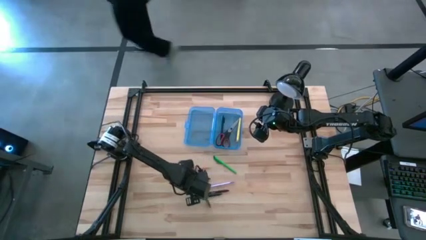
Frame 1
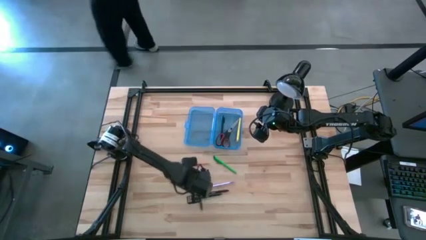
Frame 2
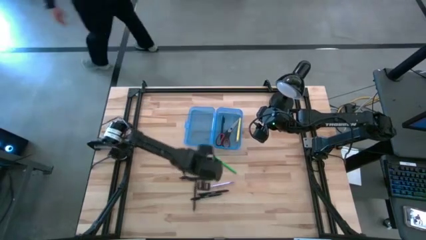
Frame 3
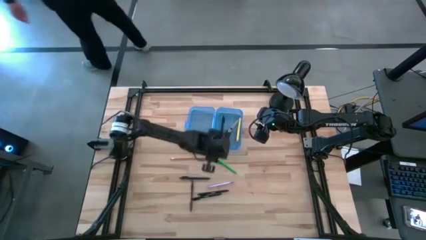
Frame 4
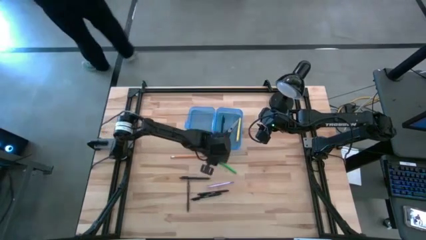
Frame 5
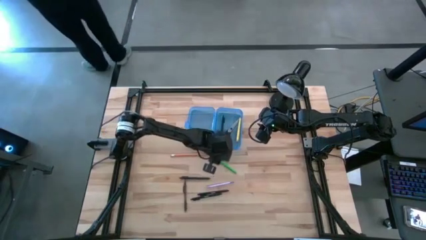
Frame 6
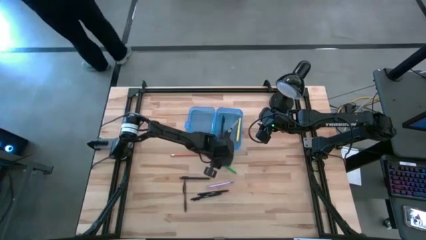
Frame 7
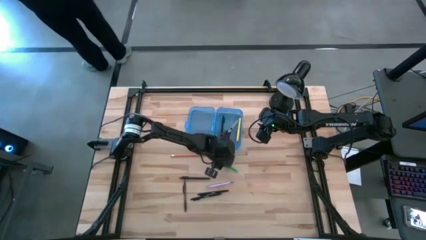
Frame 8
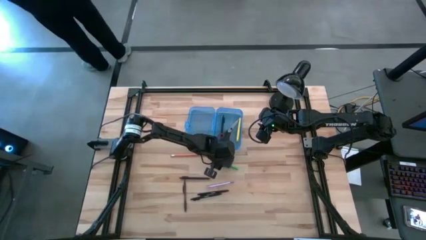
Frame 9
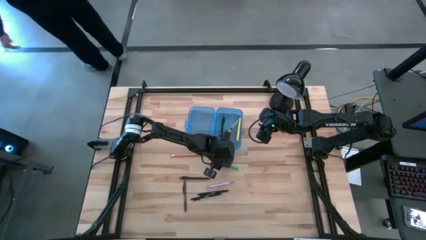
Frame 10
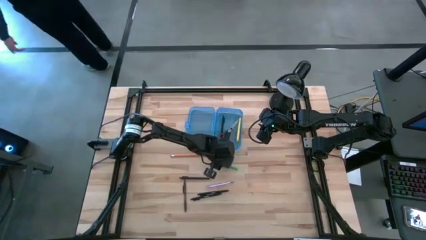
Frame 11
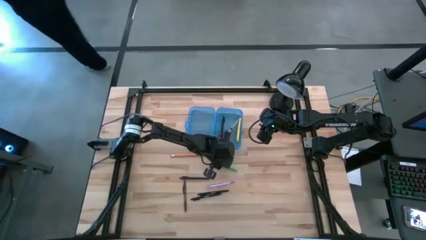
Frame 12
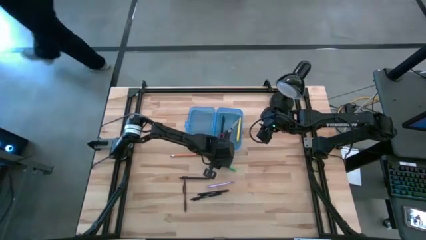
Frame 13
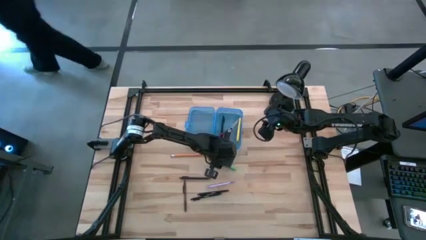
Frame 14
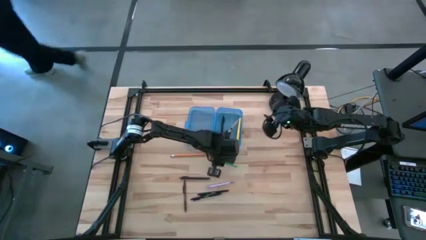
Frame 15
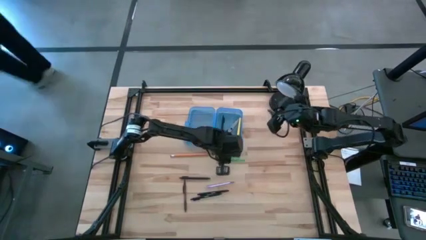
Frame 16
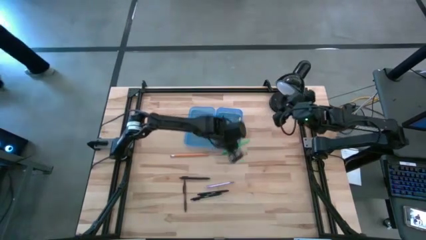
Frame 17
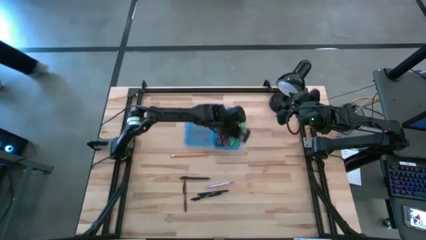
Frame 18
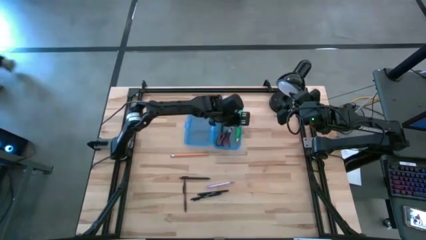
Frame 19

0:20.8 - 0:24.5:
Task: Pick & place school supplies into a supply box
Put the green pen into the blue box

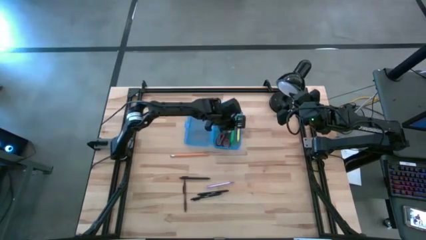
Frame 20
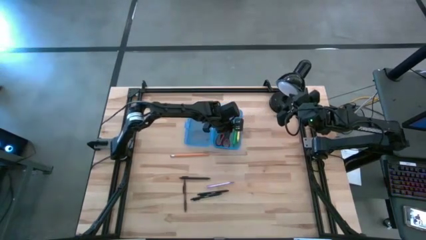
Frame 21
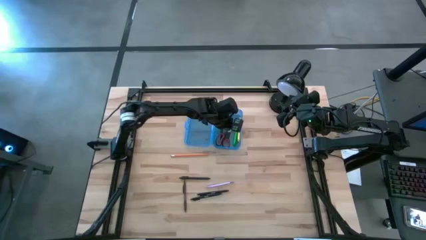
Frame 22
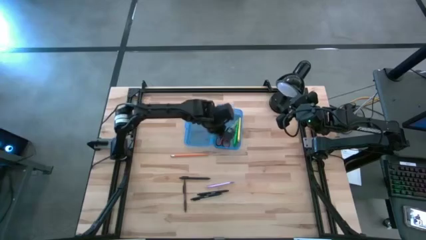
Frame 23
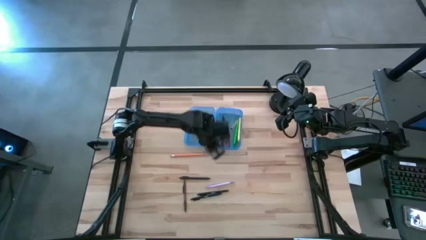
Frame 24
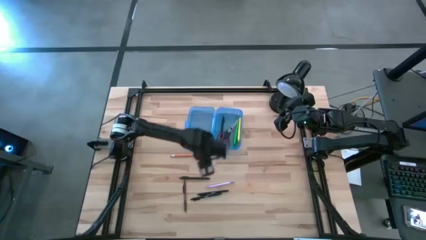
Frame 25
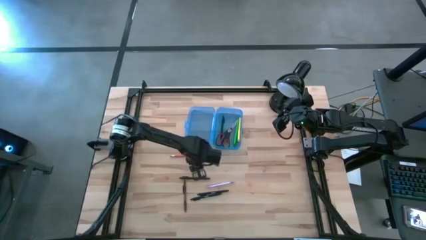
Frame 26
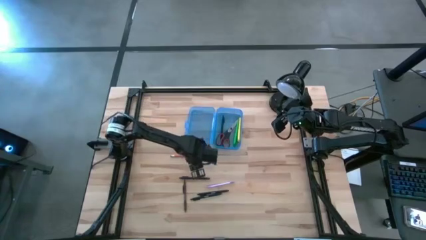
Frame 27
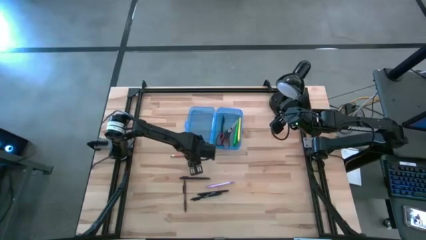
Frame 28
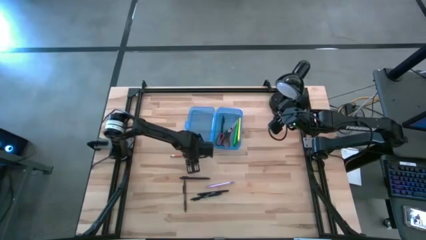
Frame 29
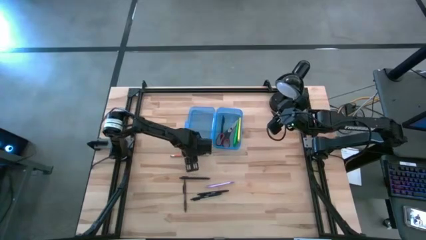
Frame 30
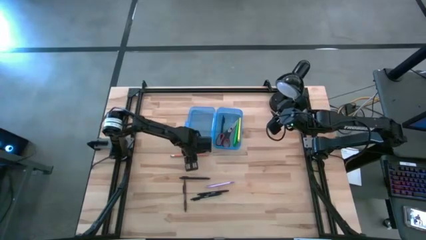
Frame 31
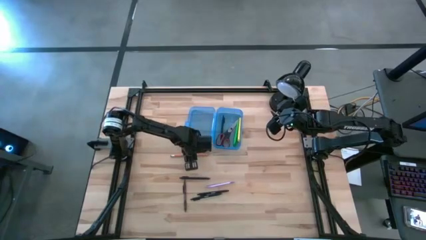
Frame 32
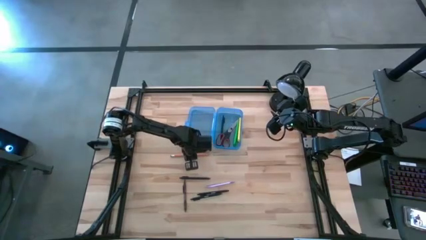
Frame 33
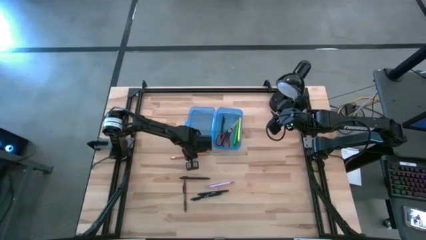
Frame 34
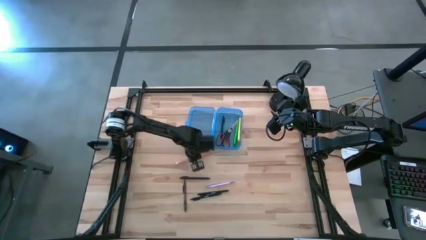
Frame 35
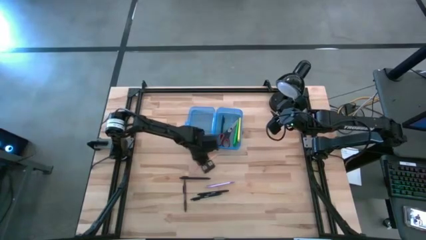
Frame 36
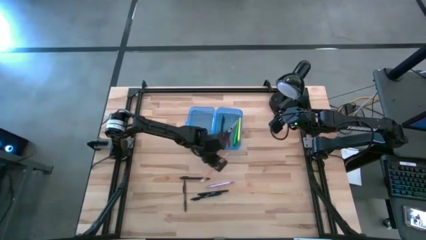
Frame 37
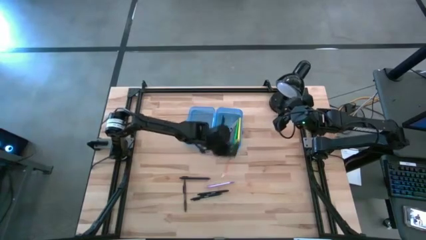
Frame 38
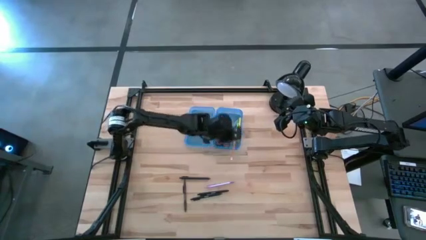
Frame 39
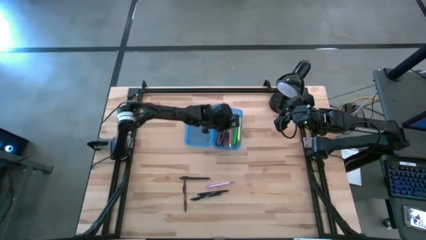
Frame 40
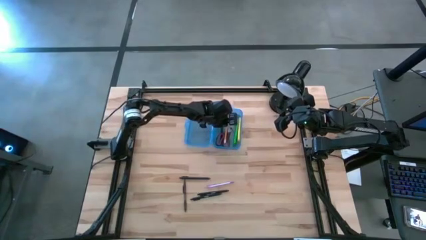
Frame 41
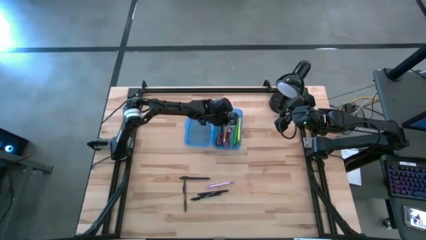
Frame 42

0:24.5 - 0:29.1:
Put the orange pencil into the blue box

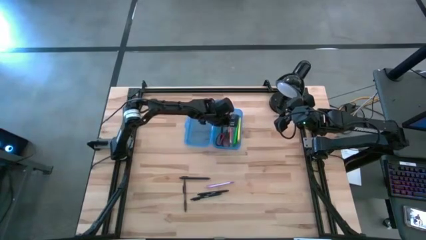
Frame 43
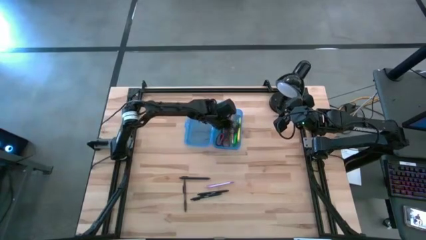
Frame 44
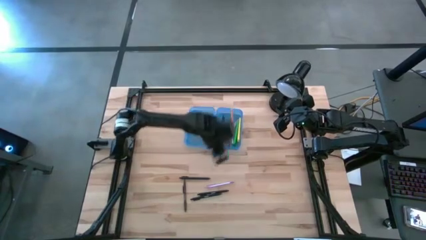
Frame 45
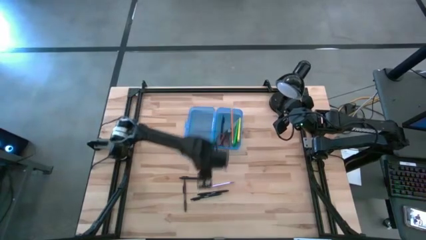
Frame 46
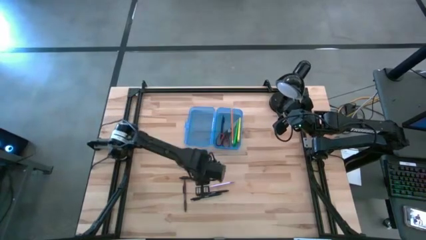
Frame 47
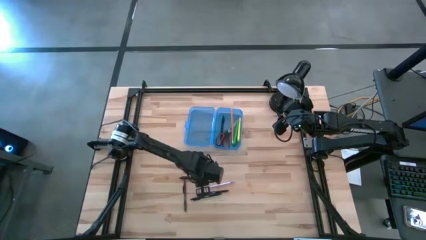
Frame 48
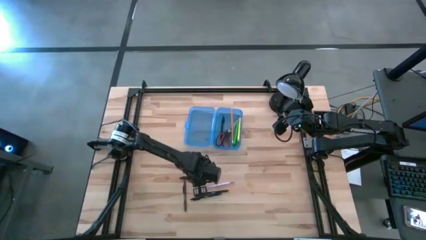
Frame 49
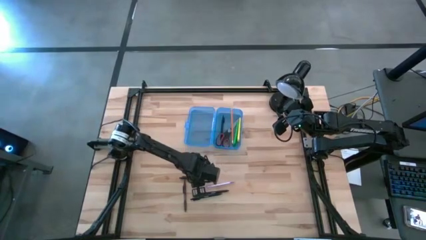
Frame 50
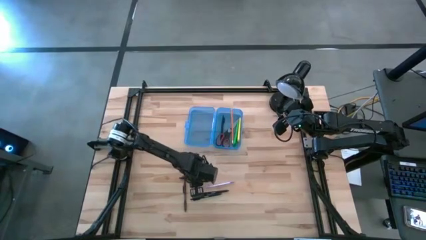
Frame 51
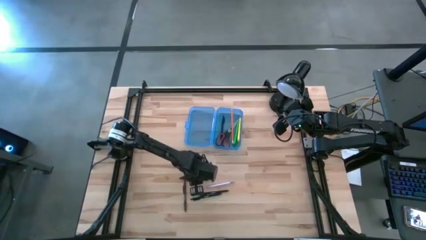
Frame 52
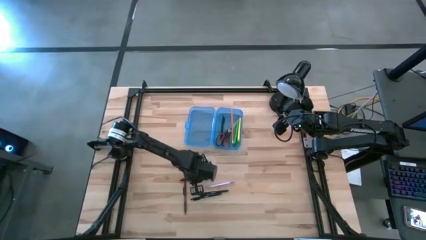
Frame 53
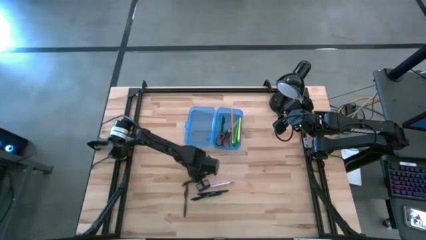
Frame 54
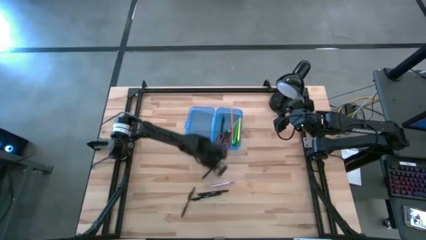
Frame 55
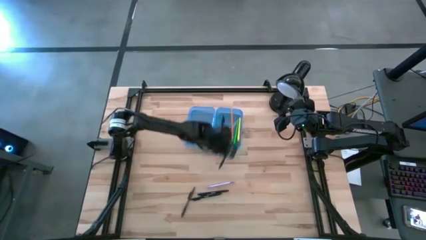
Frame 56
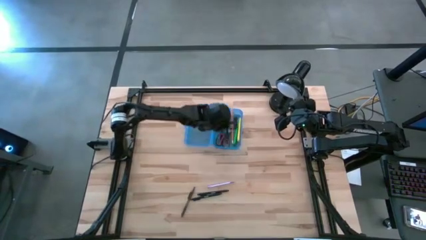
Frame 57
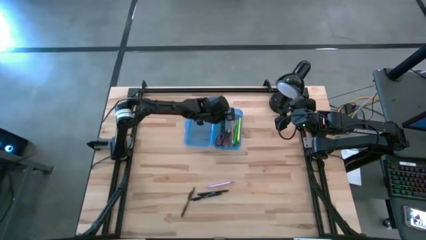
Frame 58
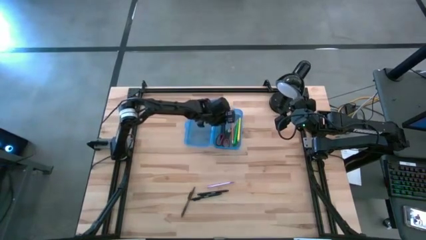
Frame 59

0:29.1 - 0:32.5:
Put the black pen into the blue box

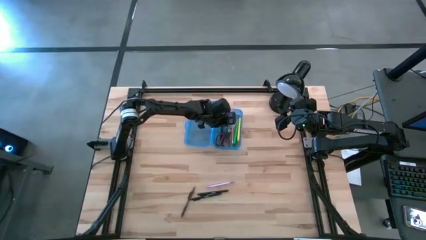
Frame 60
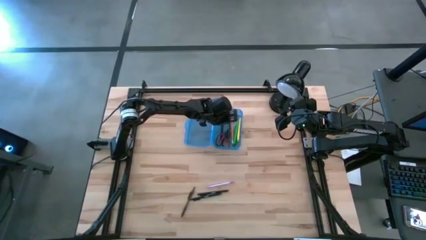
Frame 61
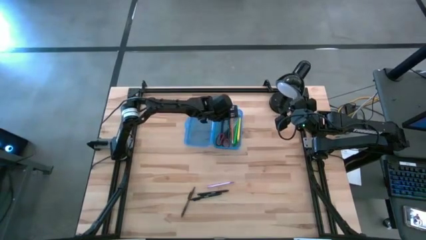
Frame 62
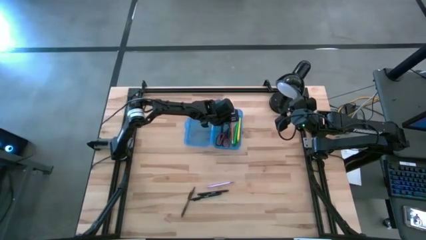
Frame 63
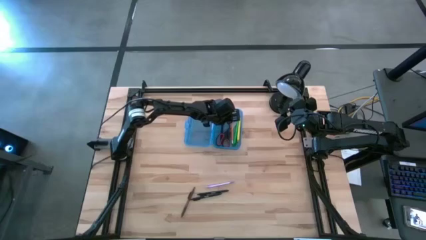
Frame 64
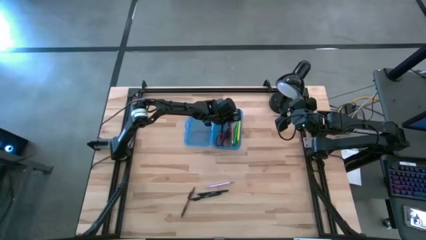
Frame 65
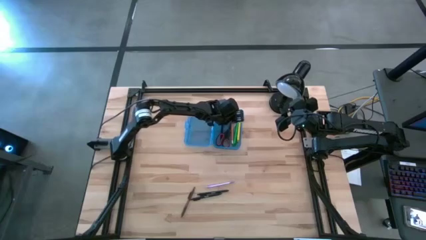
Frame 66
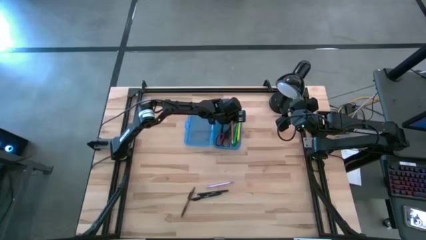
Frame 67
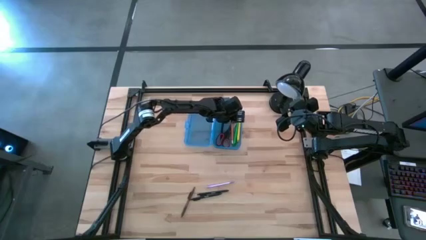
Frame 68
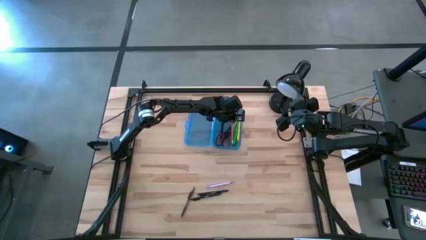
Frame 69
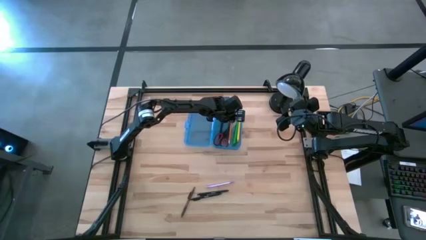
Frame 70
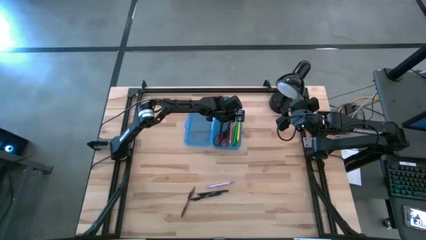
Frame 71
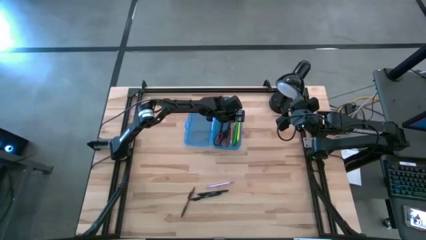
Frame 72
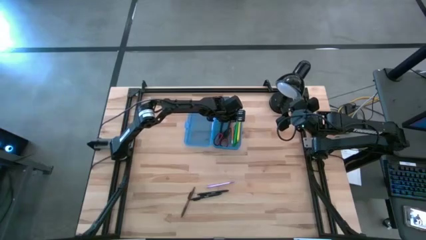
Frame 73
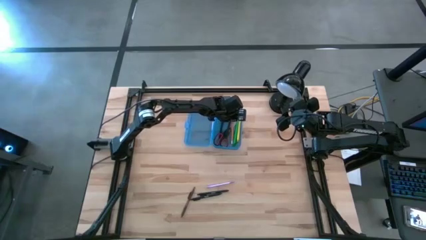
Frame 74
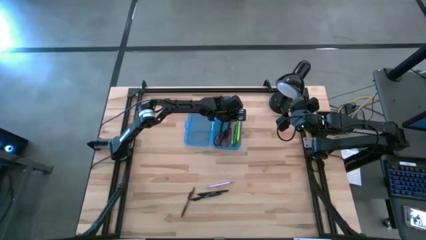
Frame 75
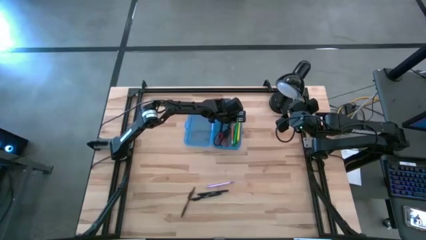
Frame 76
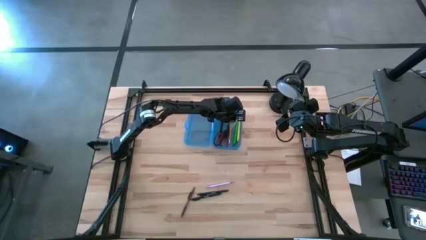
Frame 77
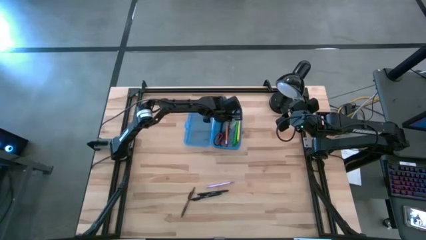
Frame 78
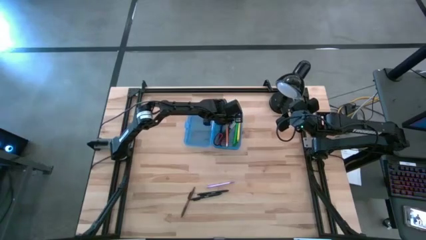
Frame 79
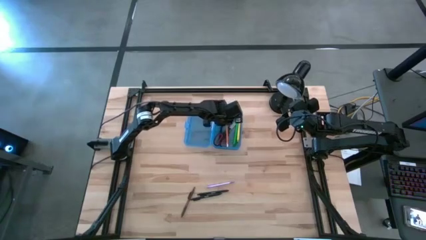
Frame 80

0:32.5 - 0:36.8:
Adjust the orange pencil in the blue box
